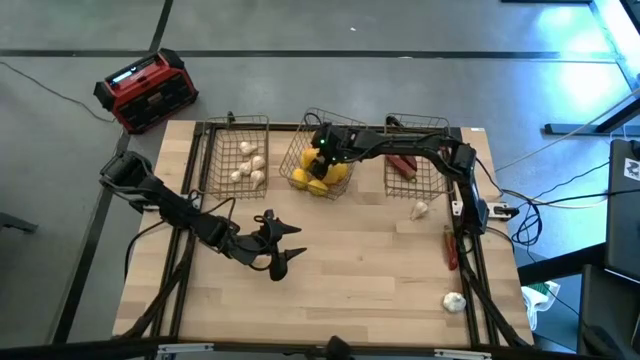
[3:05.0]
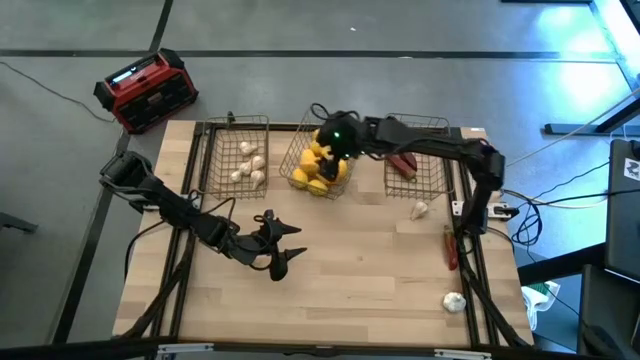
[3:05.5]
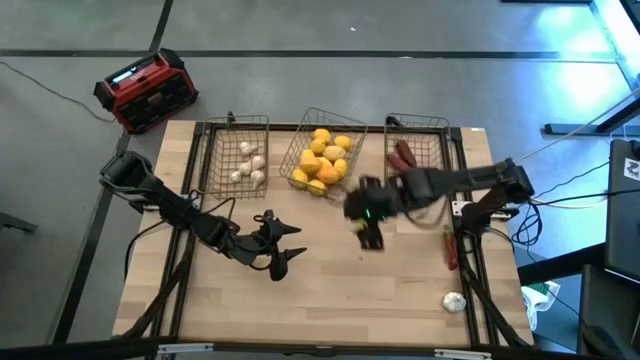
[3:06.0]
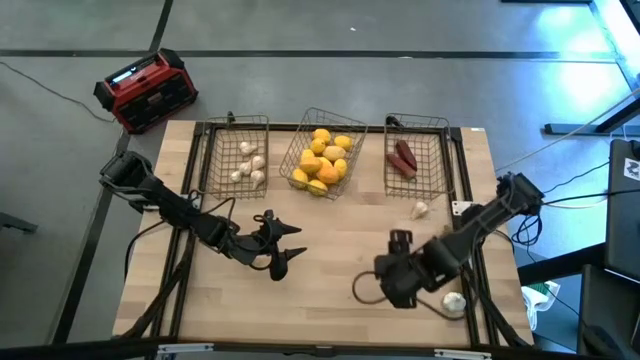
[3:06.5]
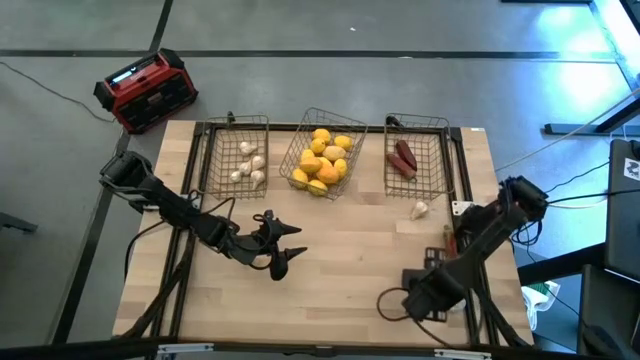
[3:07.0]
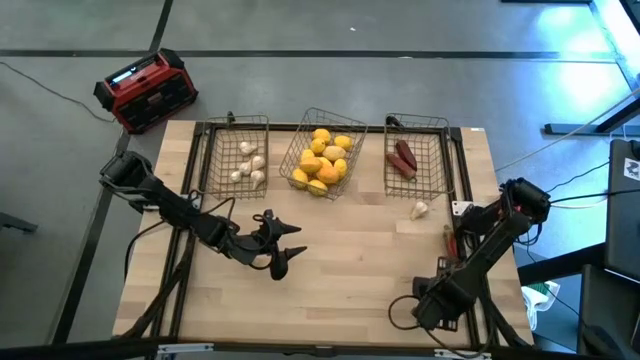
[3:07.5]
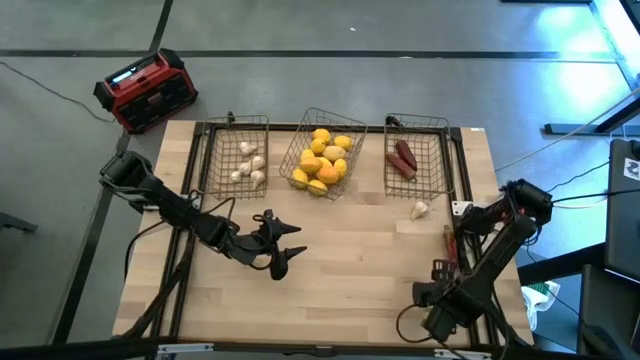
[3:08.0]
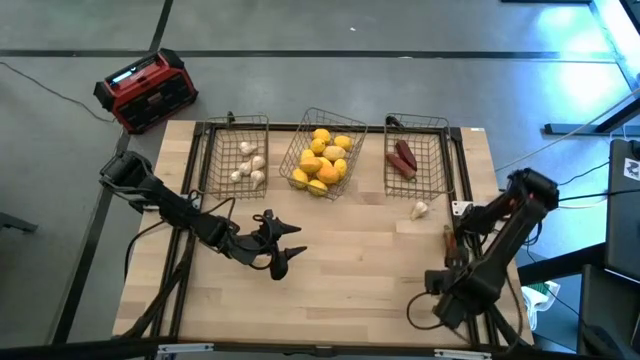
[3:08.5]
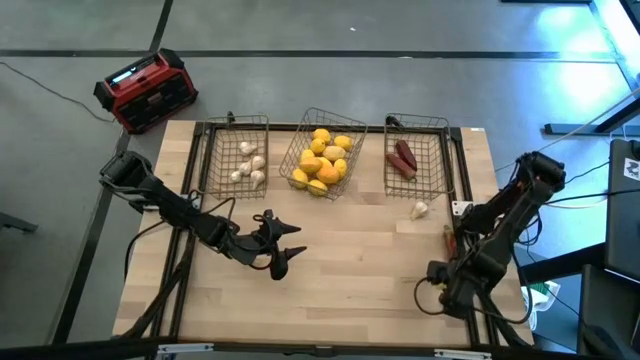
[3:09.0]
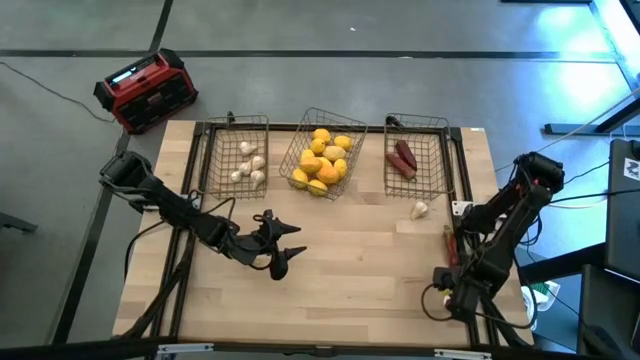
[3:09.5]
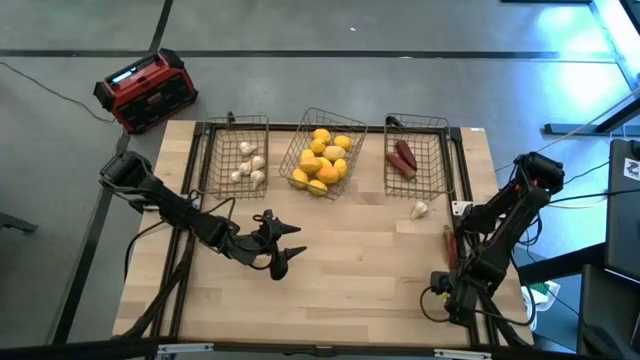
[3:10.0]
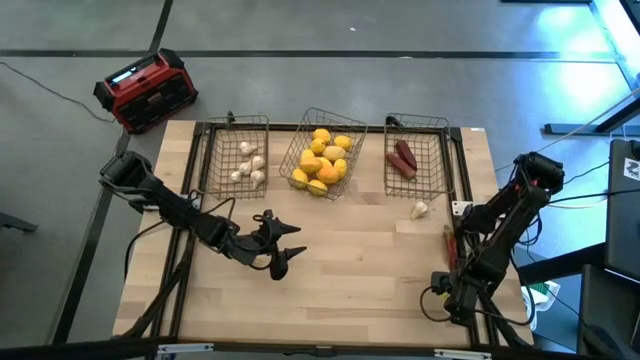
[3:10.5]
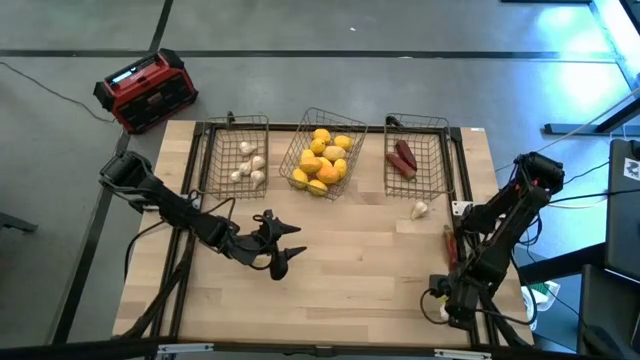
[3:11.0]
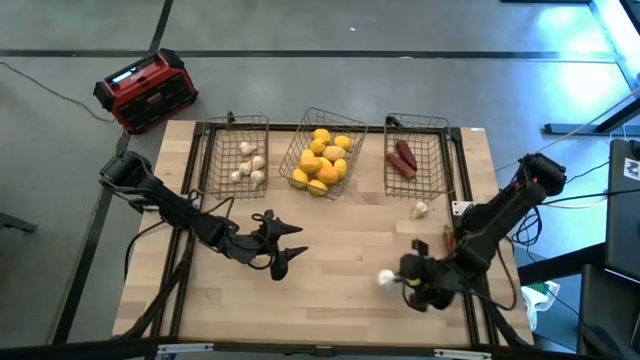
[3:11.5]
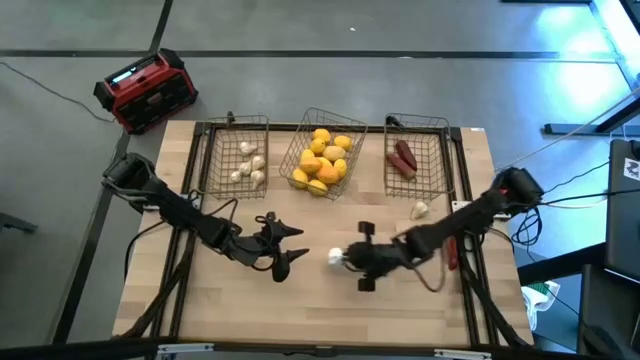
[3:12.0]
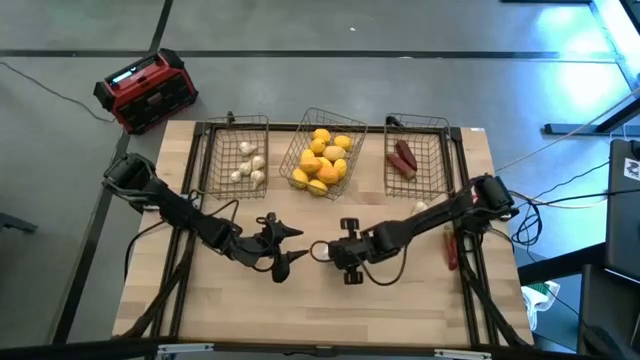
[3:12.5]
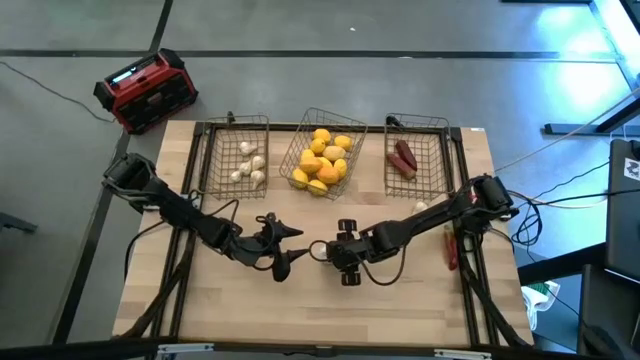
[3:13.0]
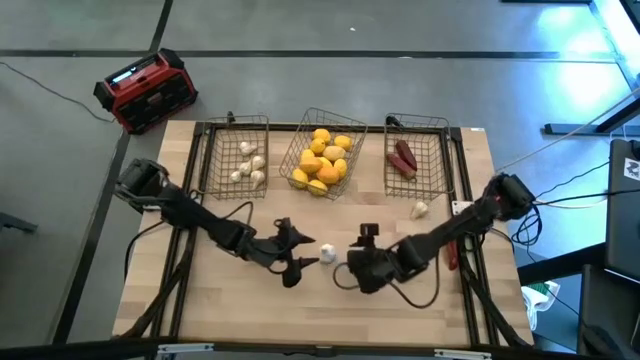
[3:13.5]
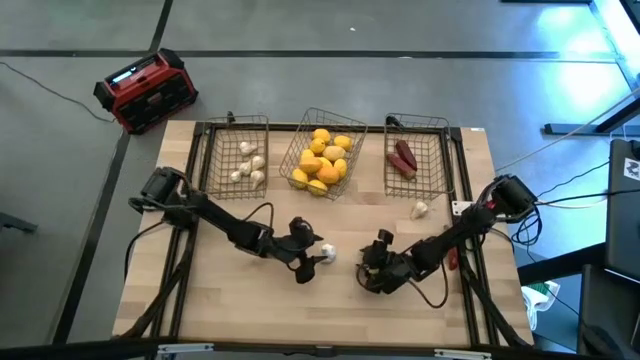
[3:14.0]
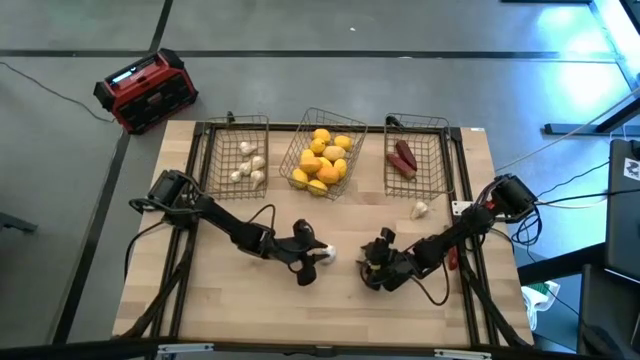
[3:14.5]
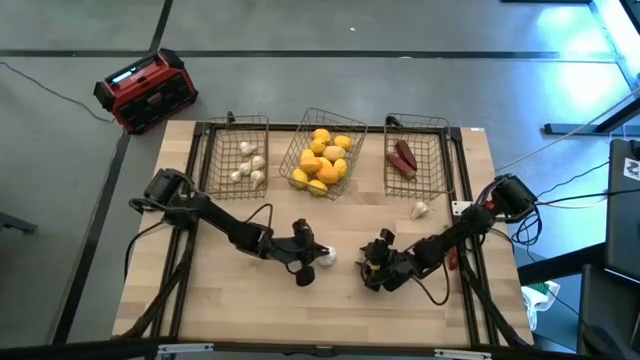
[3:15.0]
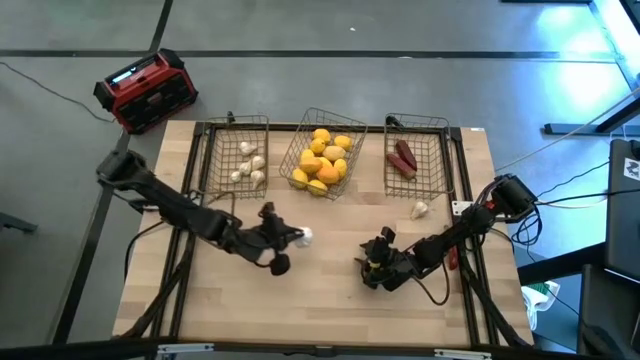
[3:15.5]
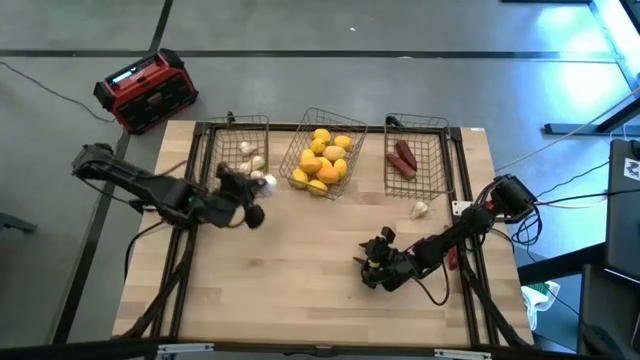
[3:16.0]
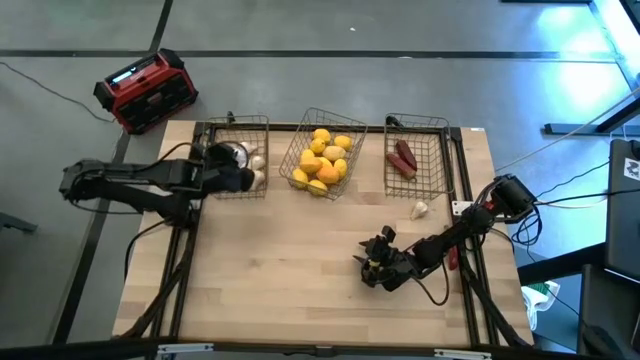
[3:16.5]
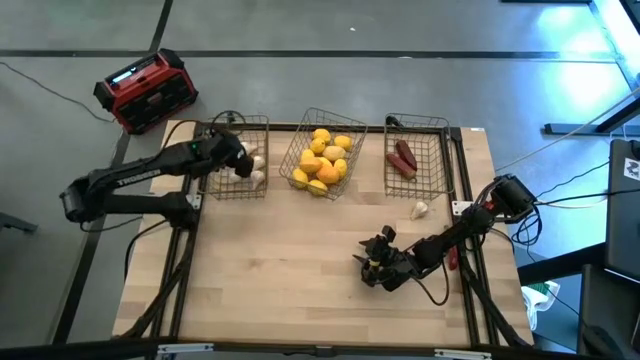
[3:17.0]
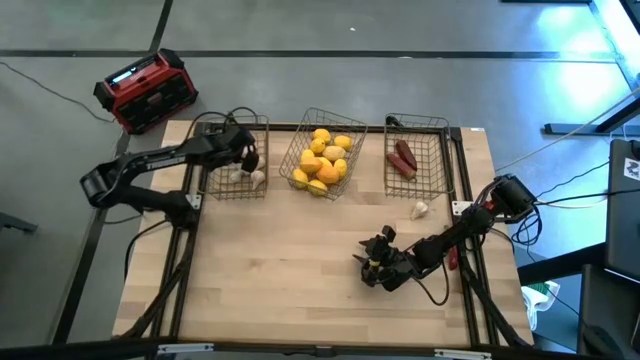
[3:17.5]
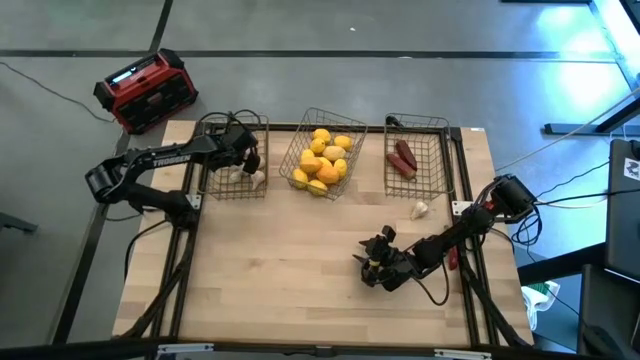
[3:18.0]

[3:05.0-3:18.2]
Task: Sort produce into baskets
Put the garlic into the left wire basket

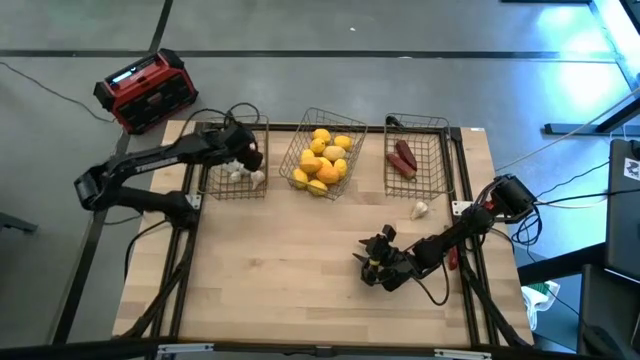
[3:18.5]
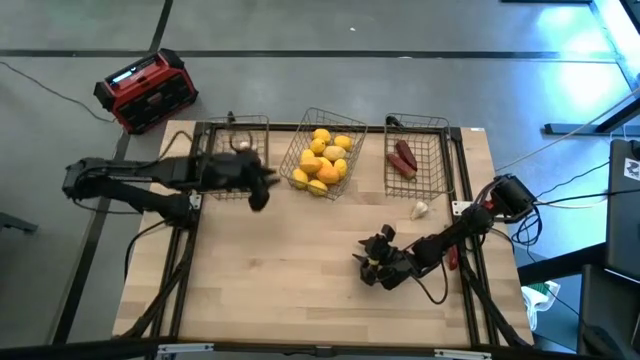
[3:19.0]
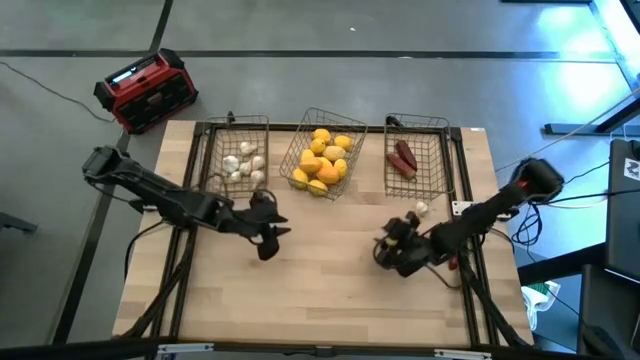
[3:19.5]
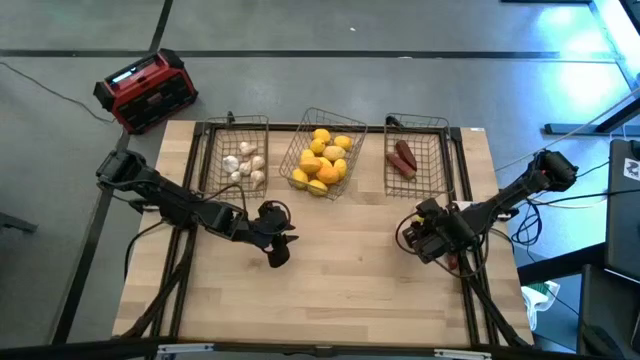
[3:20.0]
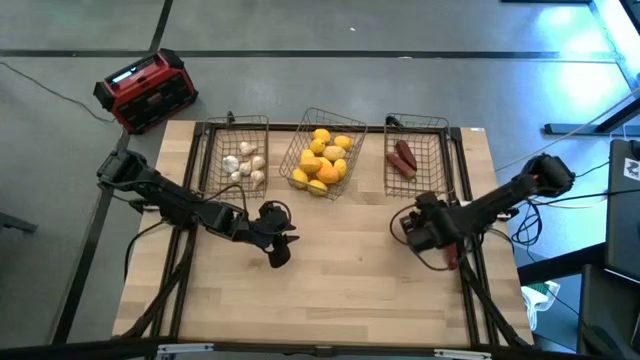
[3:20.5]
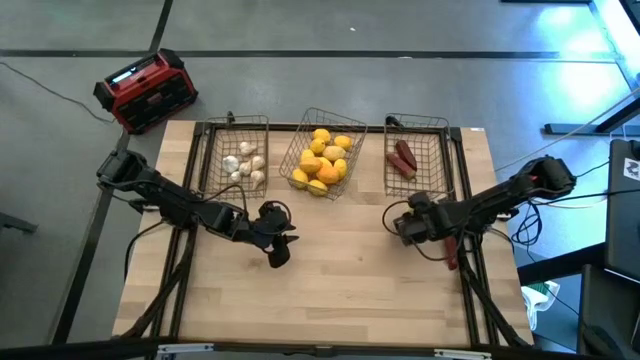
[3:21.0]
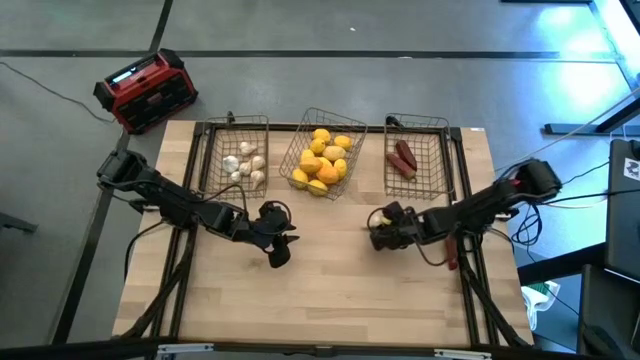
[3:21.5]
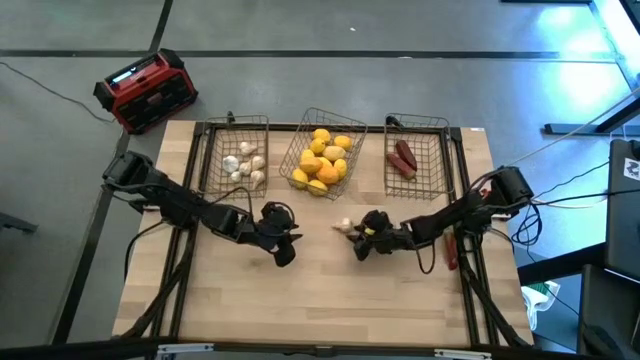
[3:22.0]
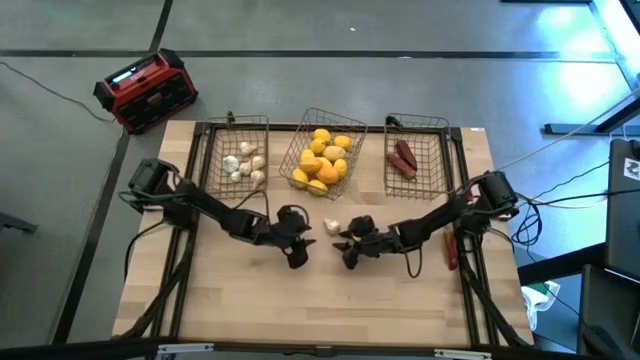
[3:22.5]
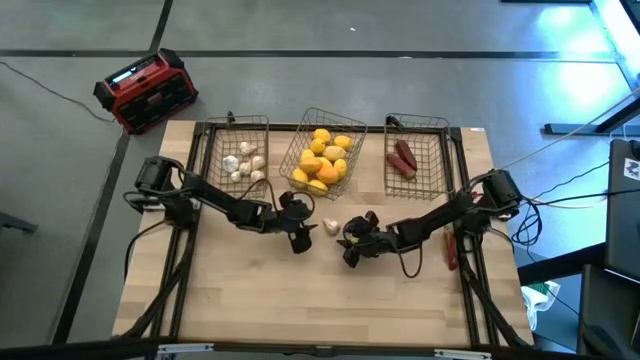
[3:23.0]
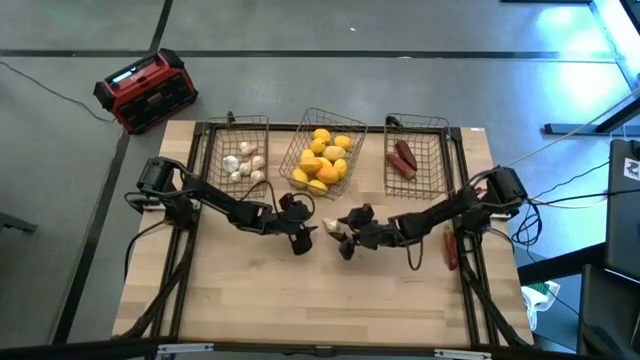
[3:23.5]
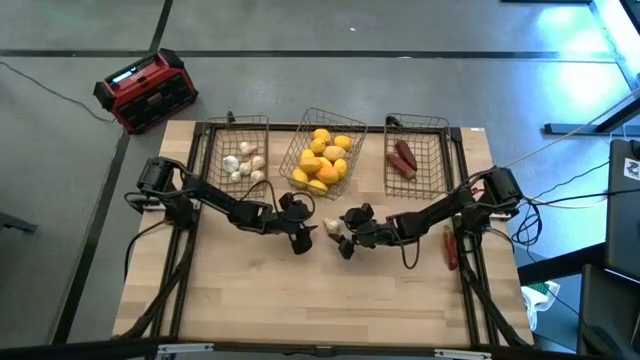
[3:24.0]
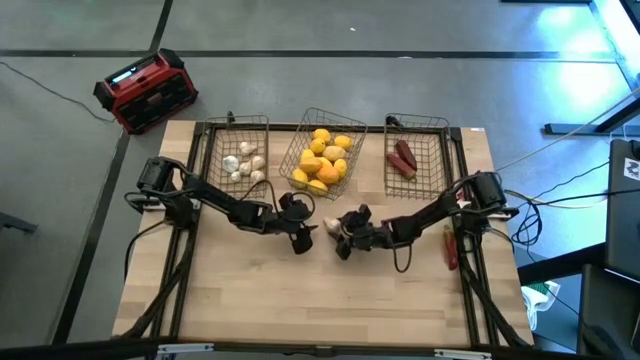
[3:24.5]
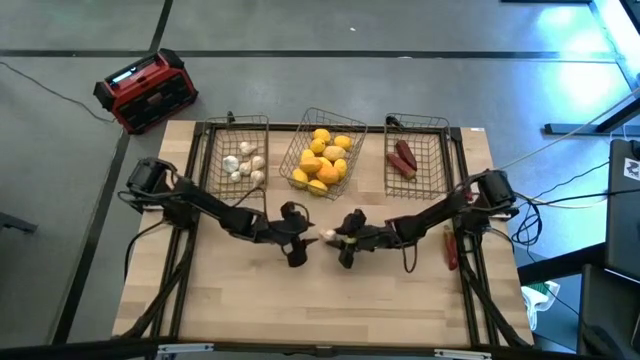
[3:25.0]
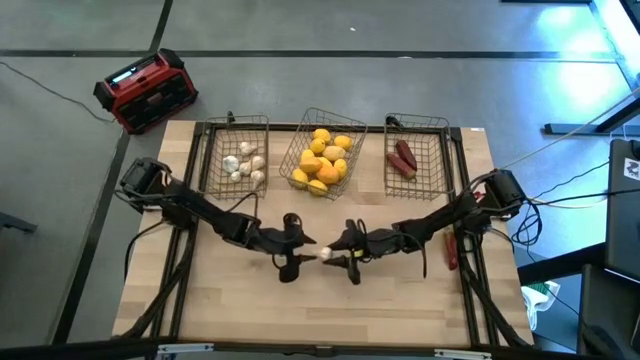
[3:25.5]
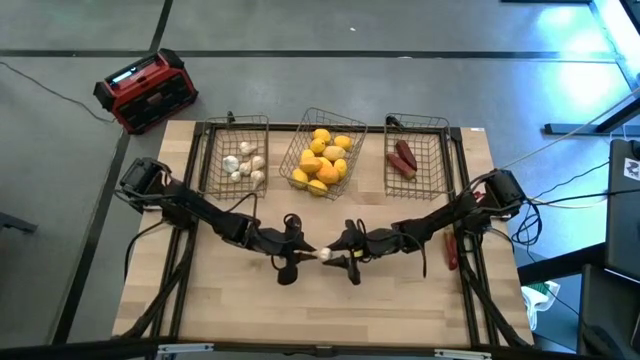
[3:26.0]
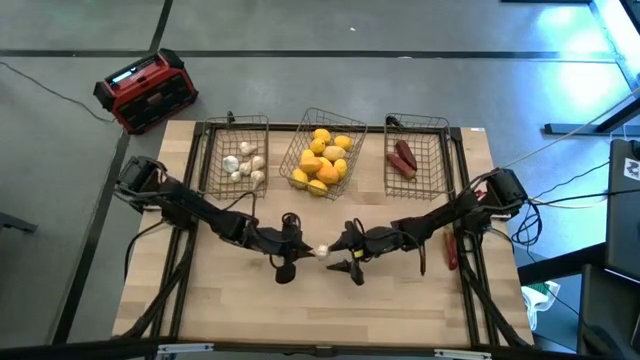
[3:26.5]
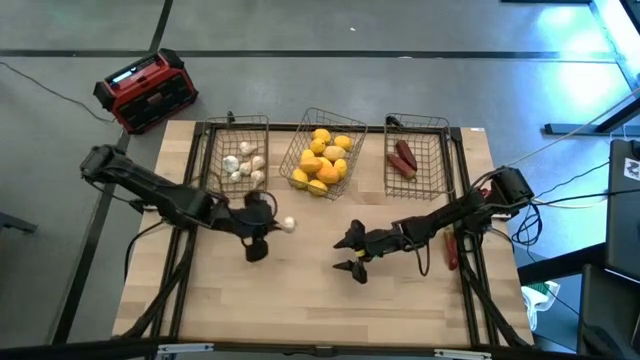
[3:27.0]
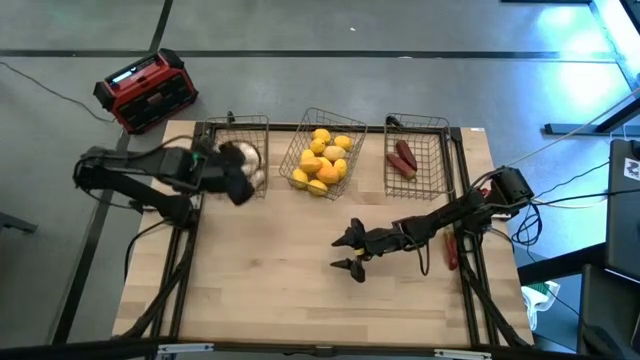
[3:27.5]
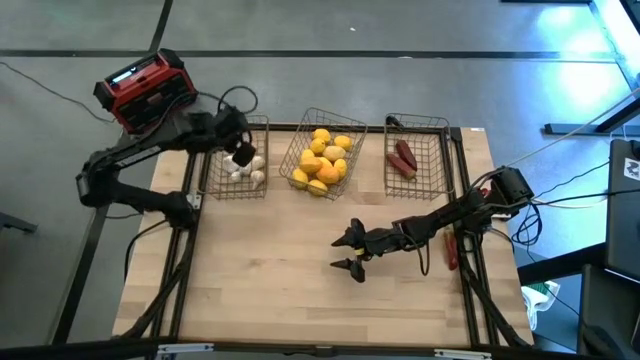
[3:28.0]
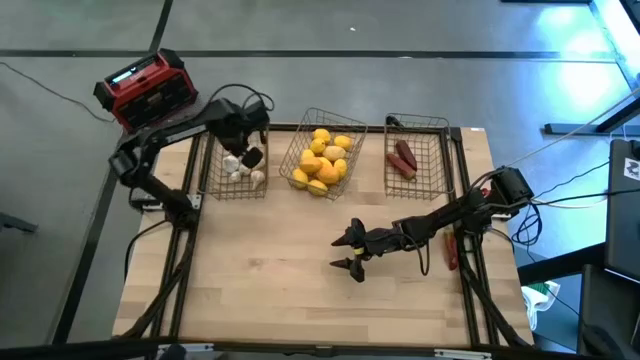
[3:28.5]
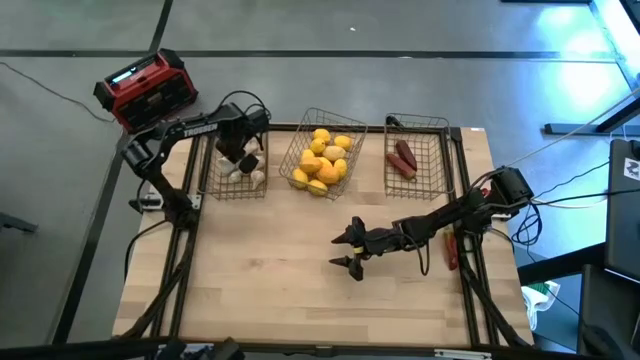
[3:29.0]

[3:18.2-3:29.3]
Put the garlic into the left wire basket
